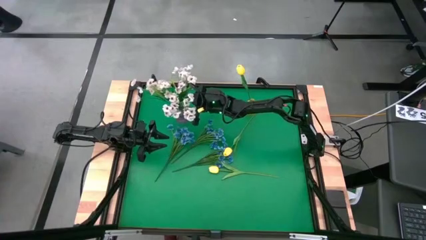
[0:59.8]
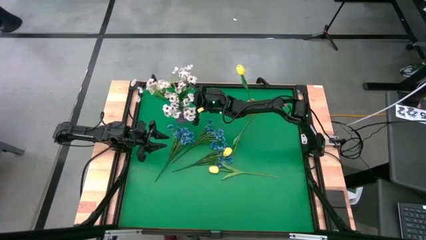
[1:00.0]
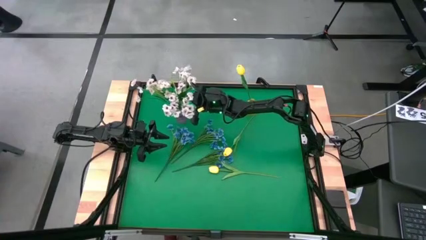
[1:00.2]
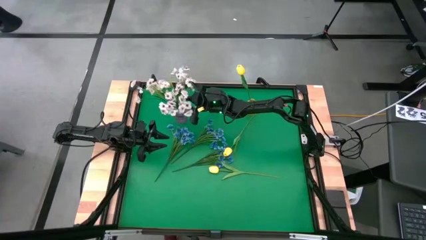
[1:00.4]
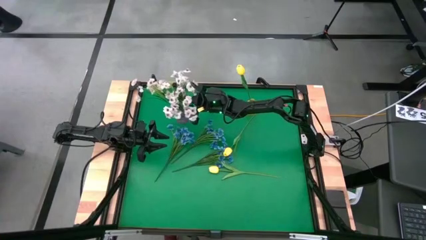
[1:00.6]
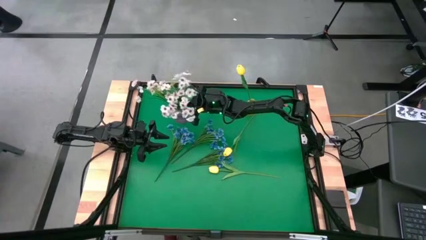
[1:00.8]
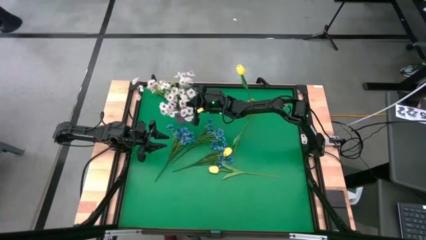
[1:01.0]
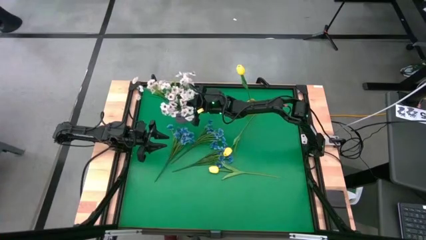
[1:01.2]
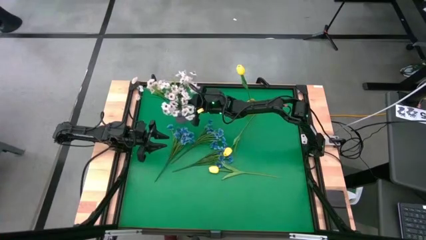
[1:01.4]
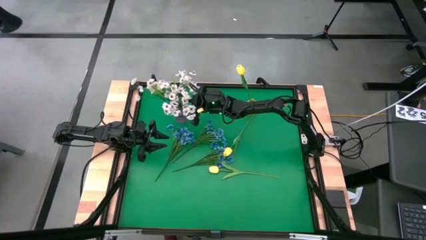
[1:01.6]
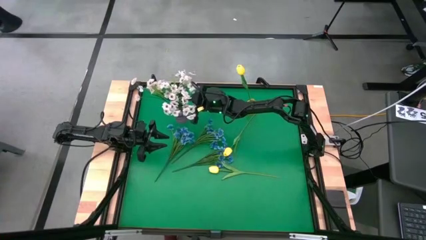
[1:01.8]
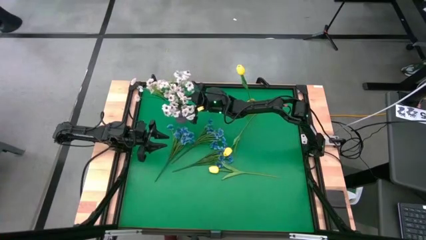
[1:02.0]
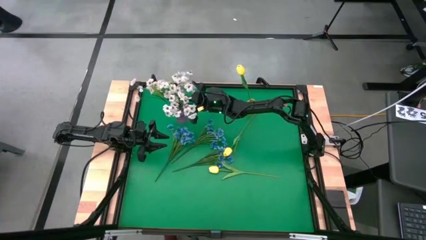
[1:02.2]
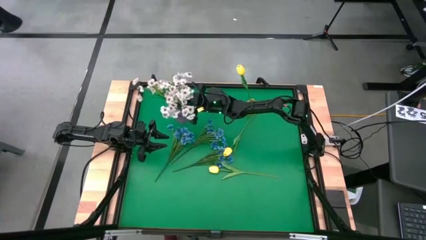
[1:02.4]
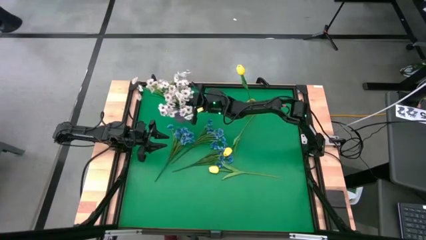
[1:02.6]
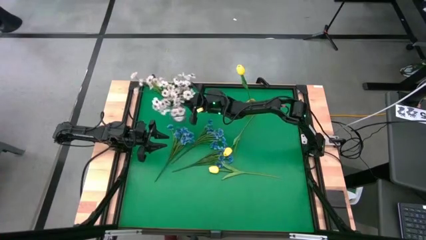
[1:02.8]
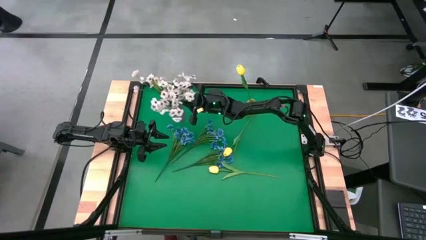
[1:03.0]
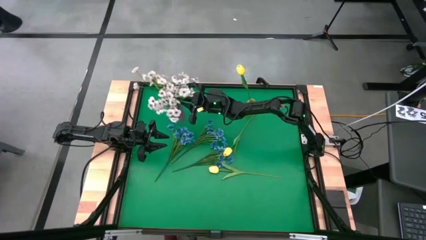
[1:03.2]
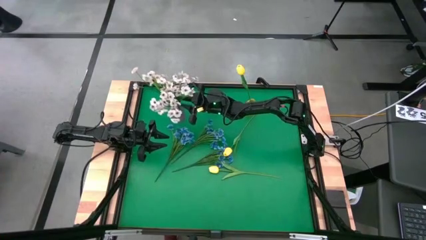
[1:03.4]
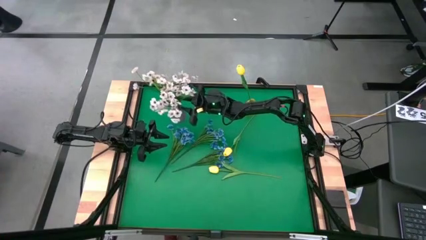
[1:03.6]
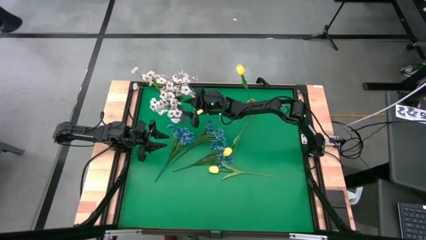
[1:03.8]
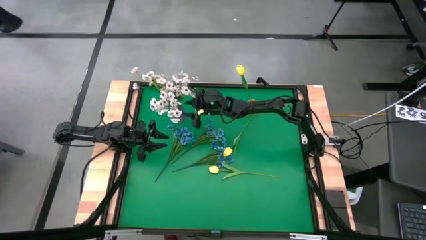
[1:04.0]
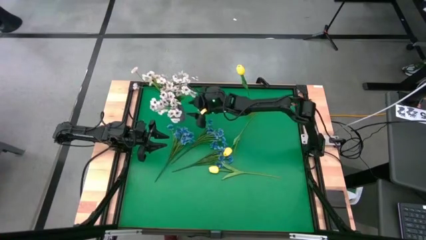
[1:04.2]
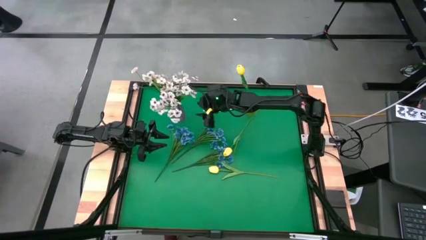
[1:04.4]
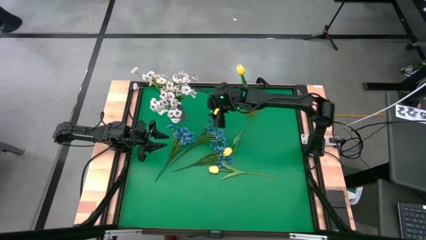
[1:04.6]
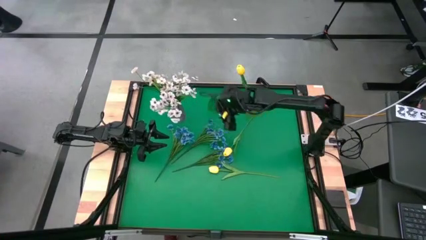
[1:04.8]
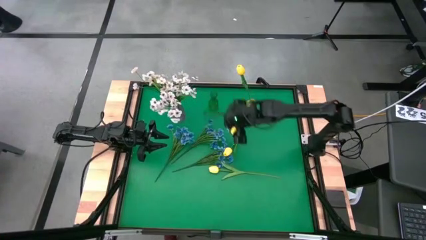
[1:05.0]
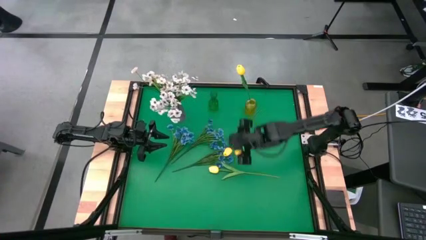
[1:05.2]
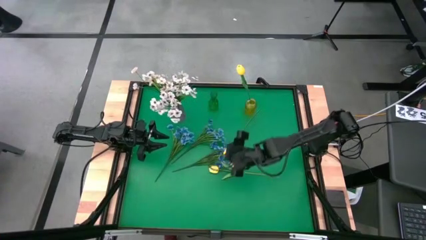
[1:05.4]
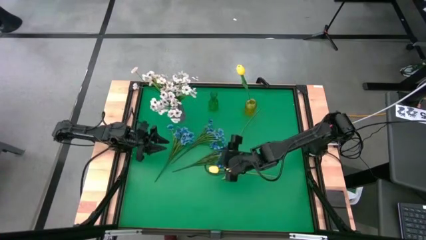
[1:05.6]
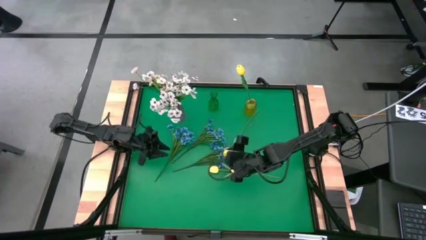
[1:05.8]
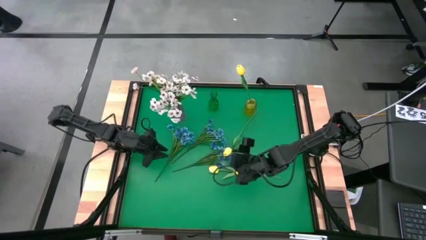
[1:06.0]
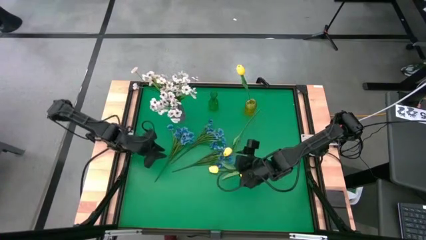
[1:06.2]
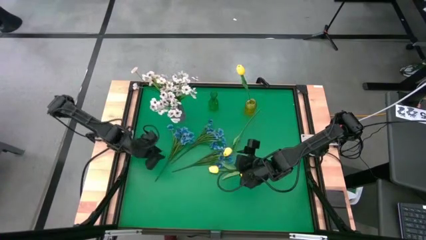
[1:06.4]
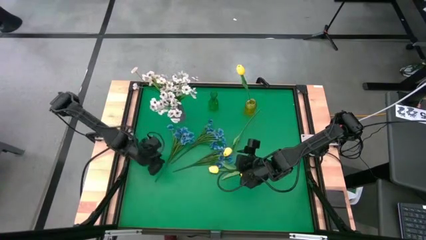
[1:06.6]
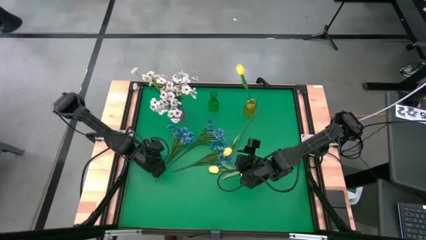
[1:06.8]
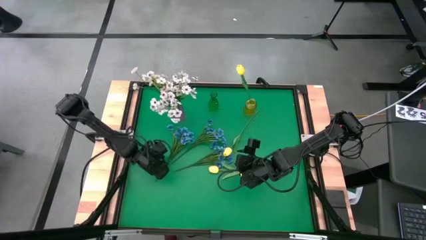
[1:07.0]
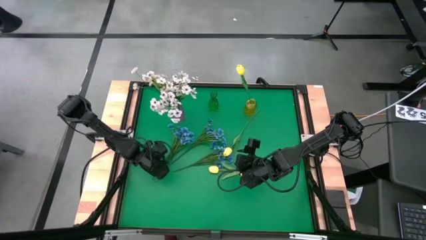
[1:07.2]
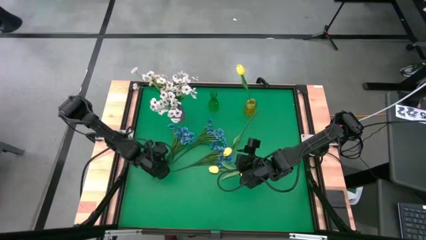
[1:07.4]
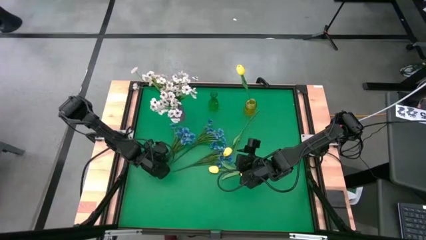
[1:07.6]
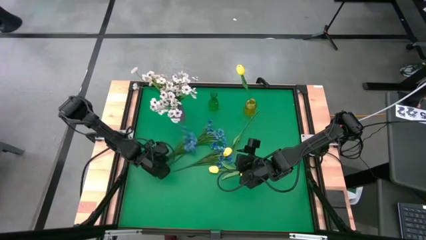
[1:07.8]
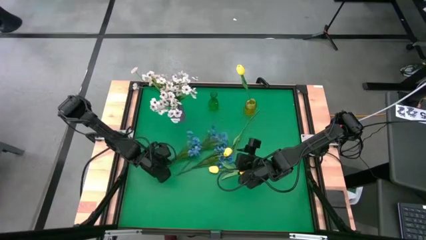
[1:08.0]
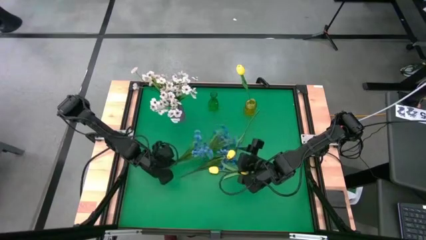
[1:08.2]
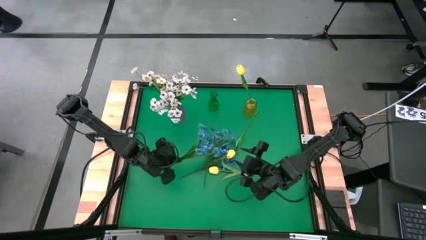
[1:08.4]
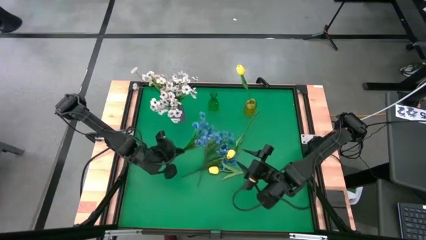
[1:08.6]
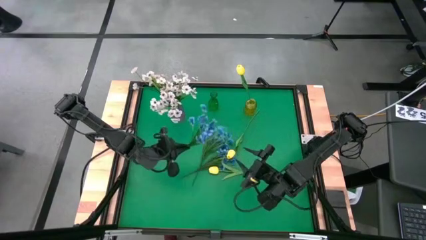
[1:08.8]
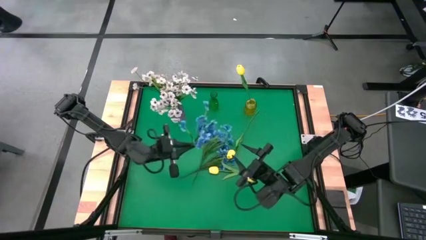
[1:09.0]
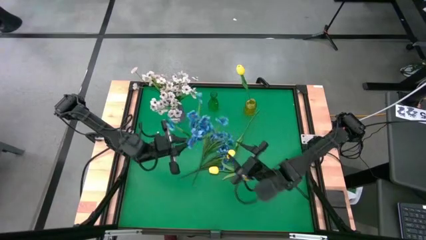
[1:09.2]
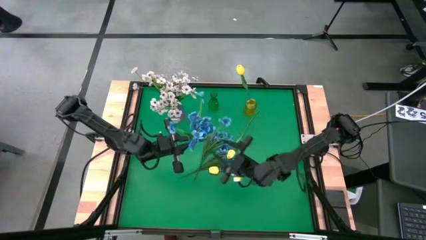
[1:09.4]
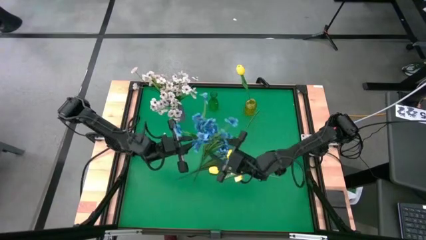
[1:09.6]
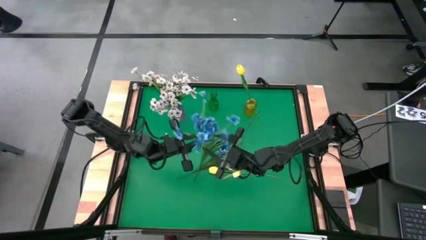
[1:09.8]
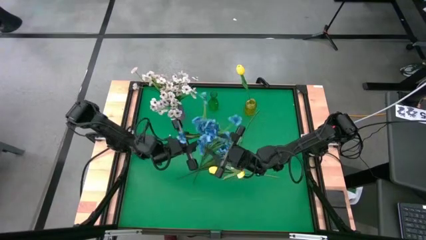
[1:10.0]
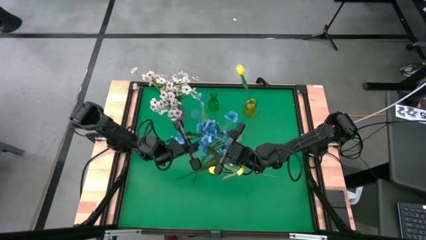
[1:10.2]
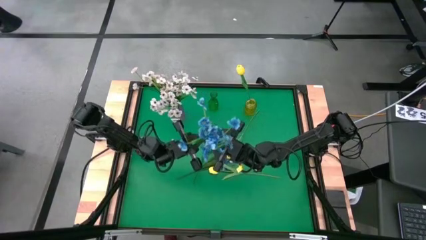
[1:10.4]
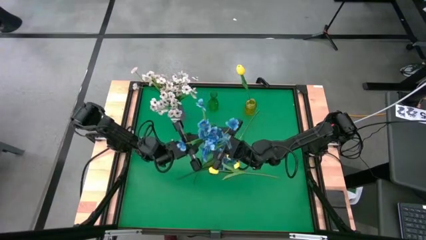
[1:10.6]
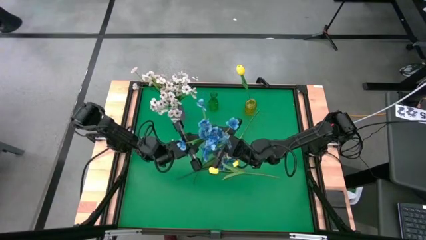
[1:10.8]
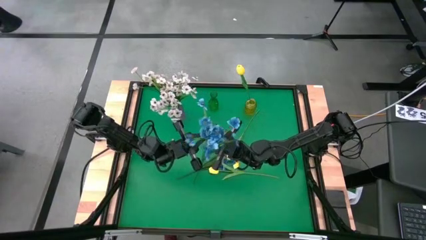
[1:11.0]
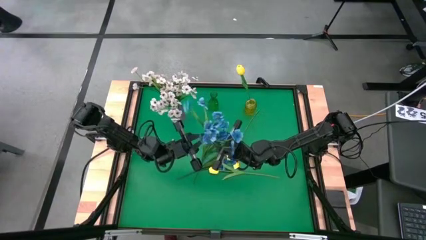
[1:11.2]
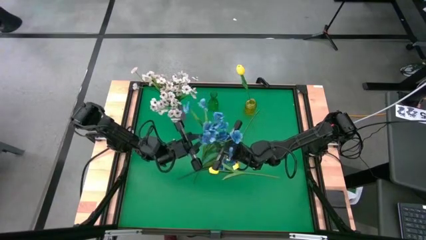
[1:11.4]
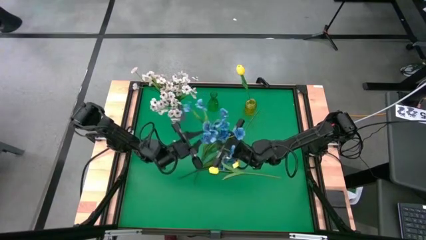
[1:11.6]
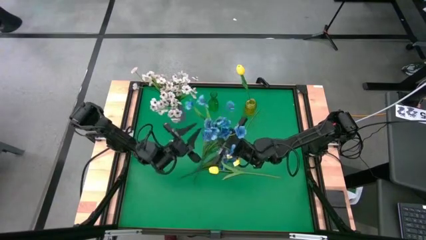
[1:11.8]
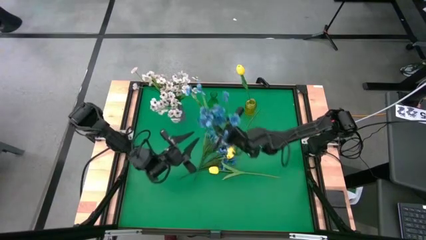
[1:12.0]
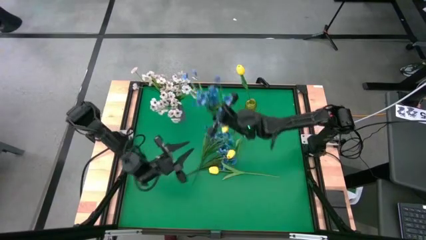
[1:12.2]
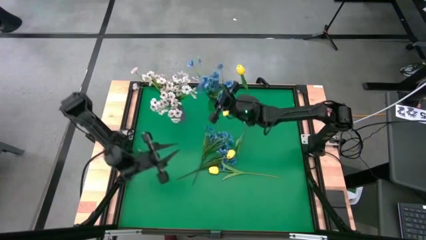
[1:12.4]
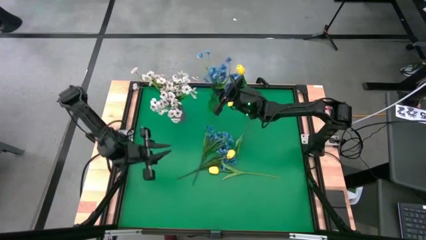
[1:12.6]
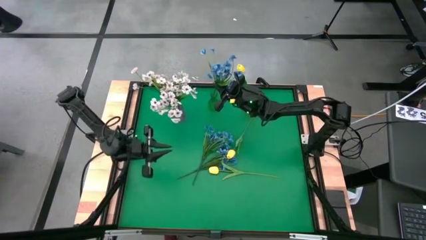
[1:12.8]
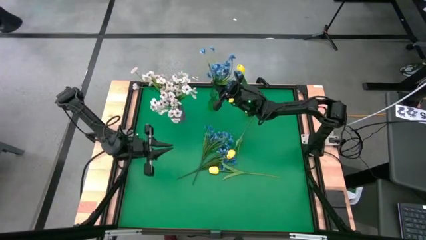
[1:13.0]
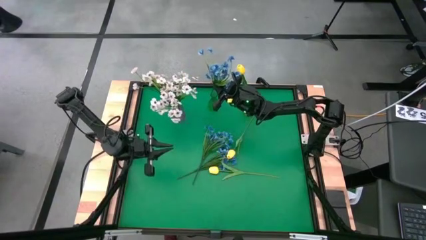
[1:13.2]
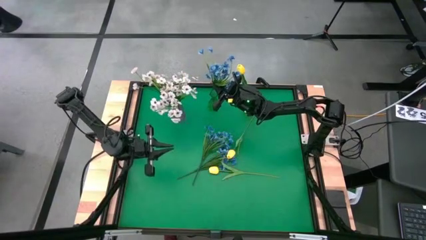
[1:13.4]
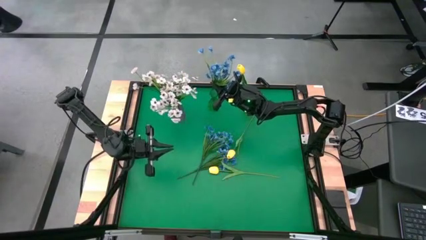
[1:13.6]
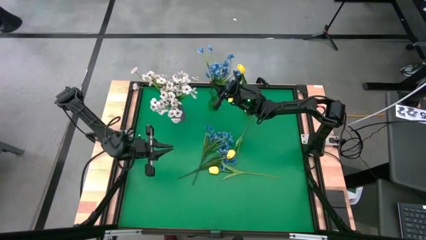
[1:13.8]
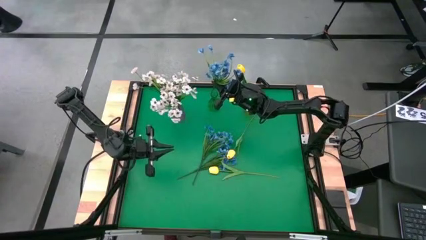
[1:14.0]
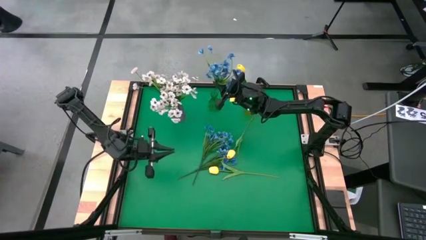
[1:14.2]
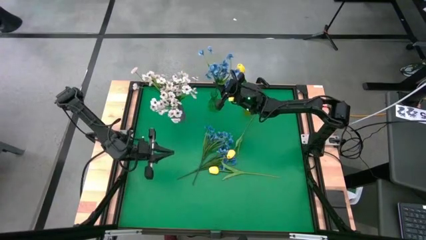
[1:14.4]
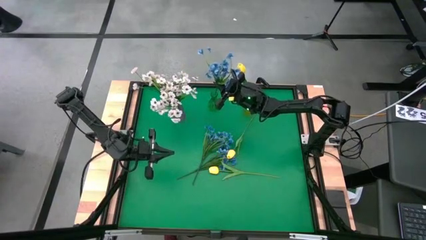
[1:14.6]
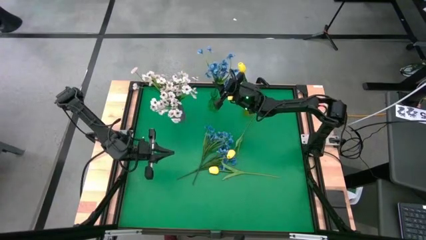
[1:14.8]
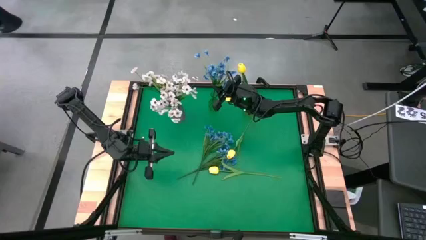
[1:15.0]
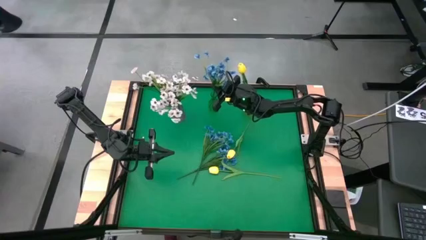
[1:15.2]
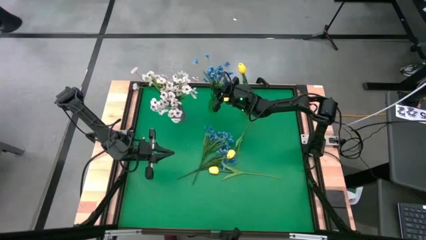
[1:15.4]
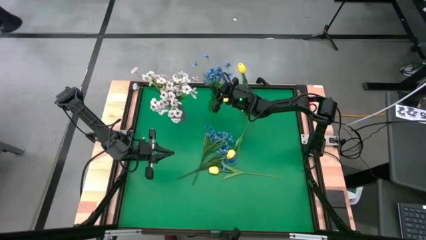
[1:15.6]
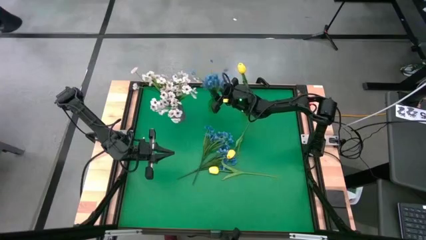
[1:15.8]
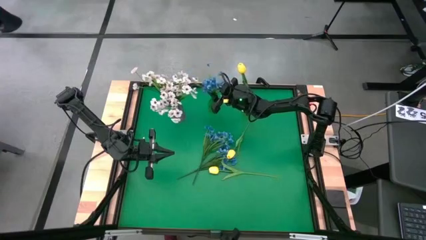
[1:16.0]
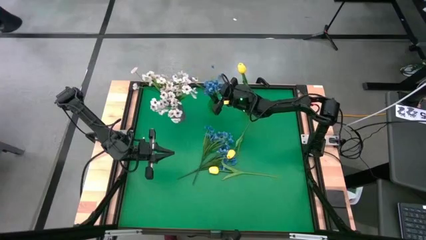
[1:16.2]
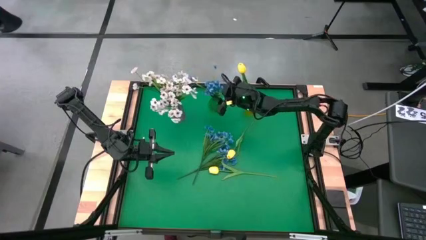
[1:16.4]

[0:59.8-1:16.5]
Task: Sort flowers into vase by color
Put the left blue flower into the green vase
